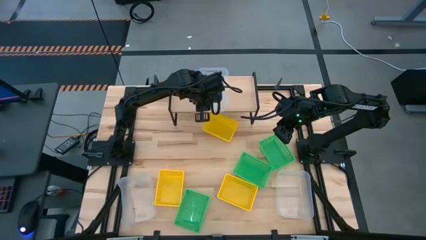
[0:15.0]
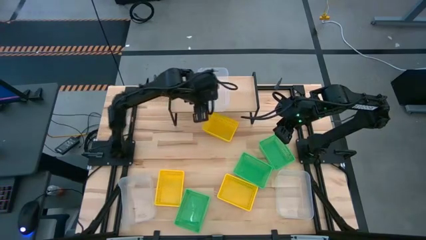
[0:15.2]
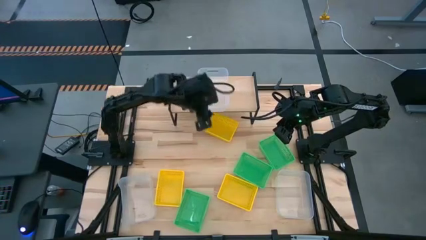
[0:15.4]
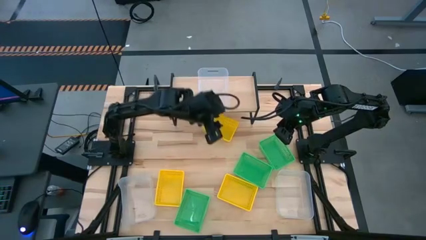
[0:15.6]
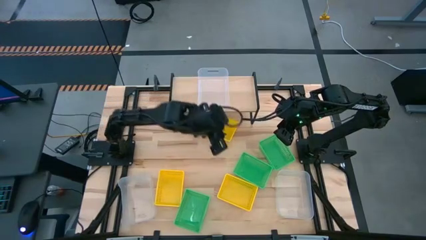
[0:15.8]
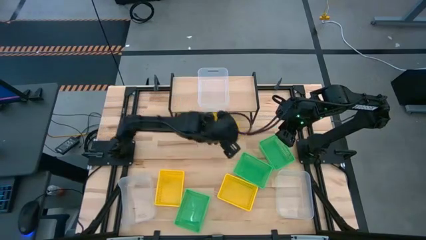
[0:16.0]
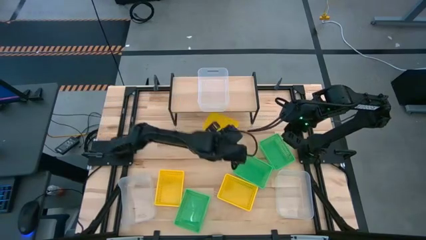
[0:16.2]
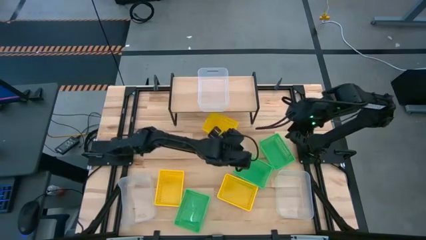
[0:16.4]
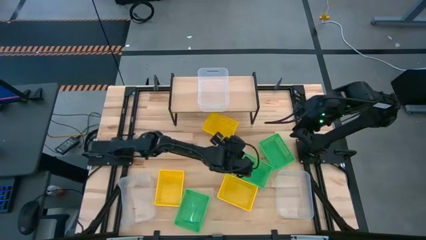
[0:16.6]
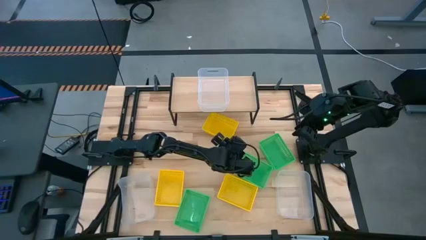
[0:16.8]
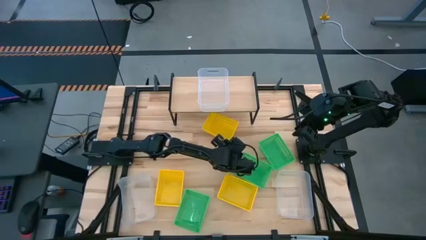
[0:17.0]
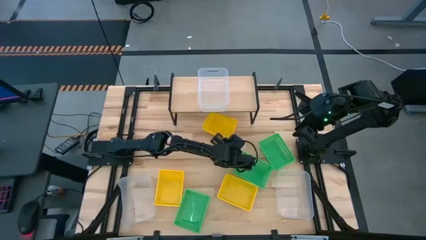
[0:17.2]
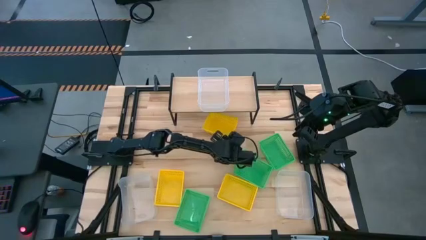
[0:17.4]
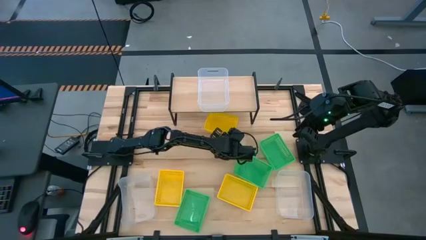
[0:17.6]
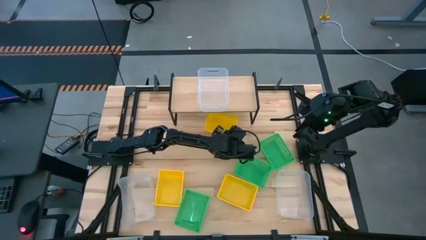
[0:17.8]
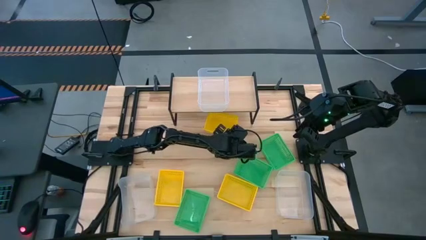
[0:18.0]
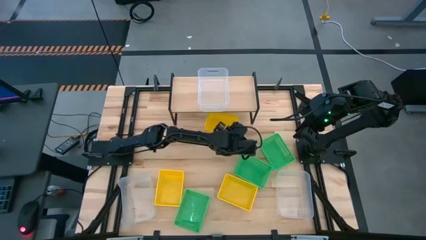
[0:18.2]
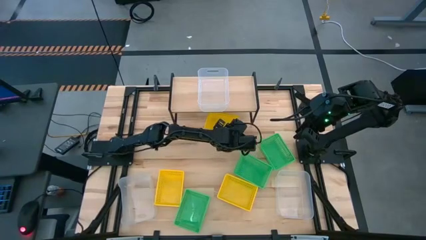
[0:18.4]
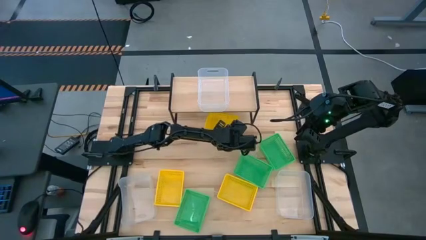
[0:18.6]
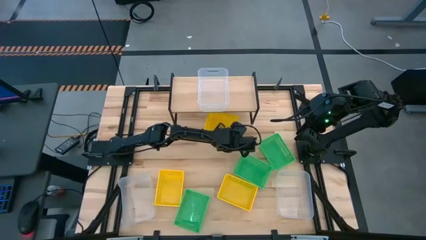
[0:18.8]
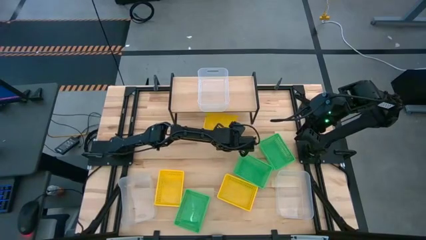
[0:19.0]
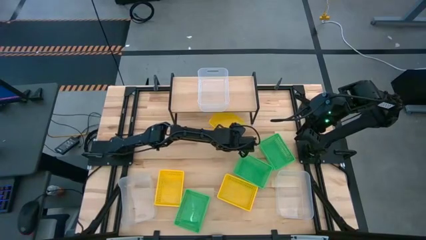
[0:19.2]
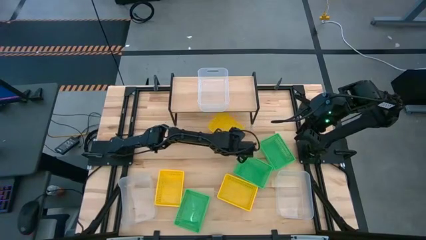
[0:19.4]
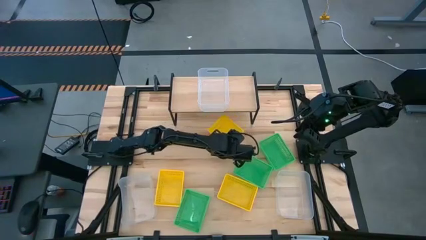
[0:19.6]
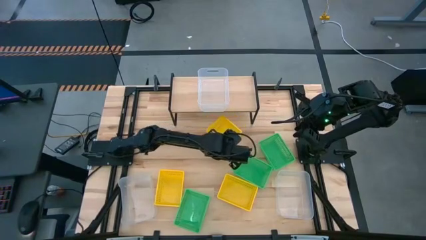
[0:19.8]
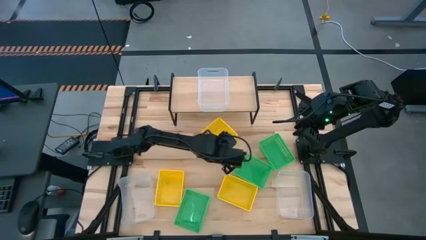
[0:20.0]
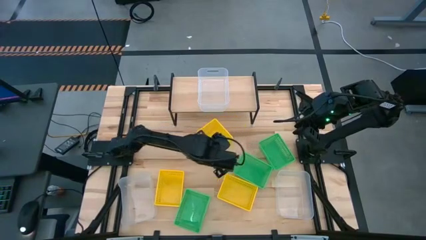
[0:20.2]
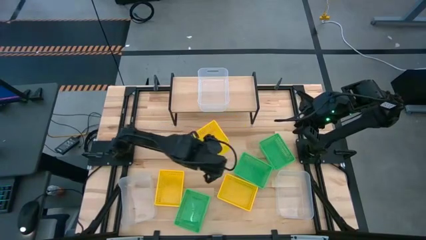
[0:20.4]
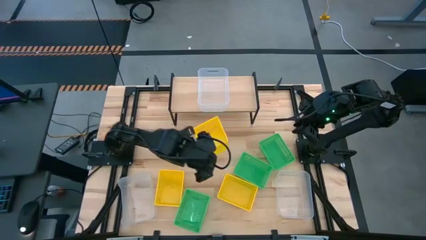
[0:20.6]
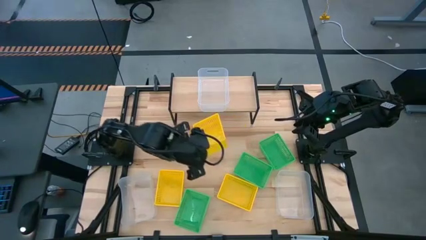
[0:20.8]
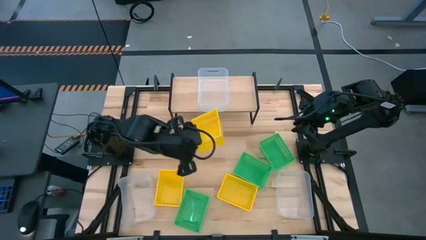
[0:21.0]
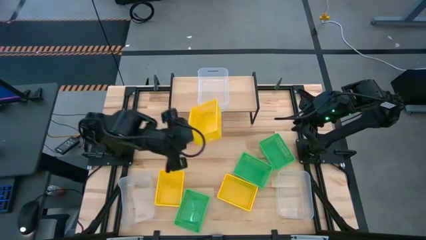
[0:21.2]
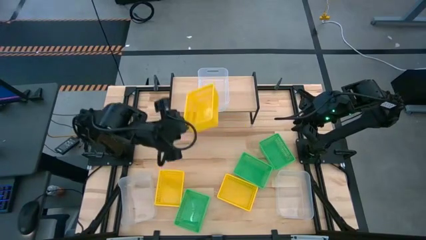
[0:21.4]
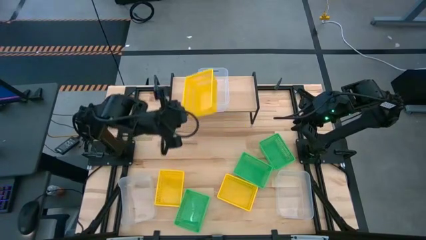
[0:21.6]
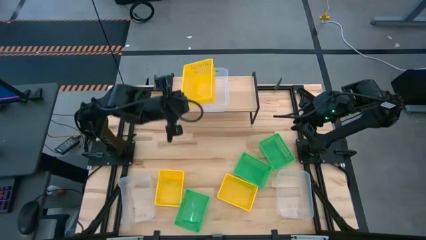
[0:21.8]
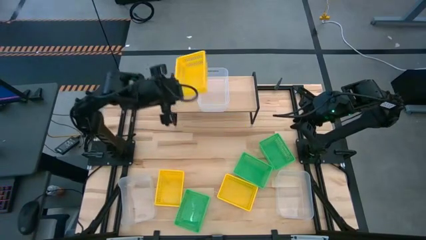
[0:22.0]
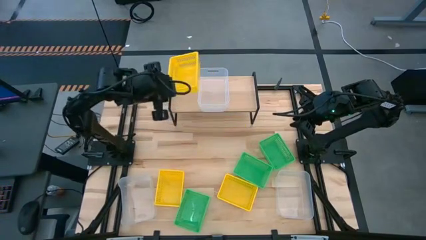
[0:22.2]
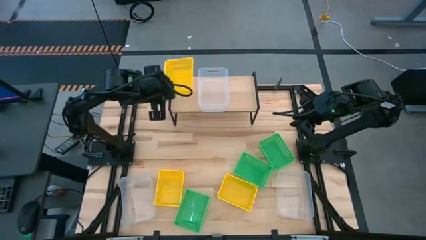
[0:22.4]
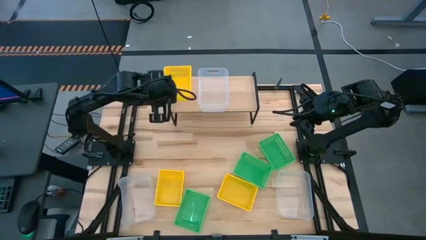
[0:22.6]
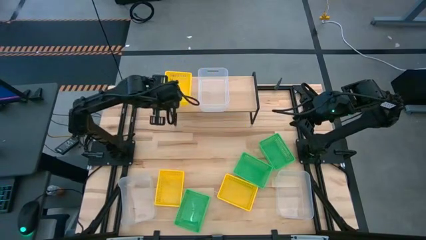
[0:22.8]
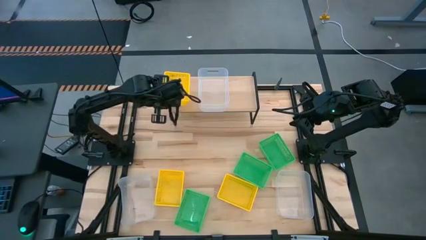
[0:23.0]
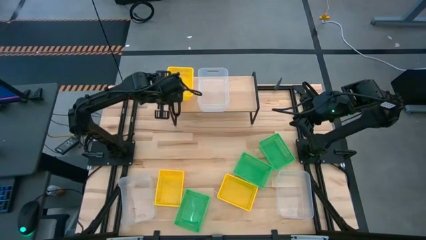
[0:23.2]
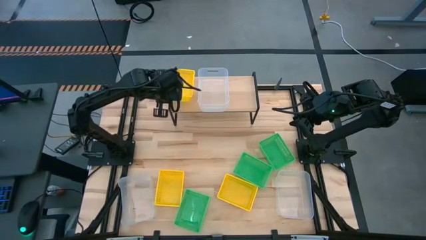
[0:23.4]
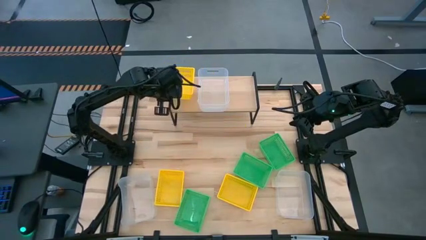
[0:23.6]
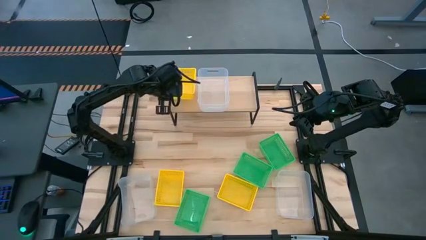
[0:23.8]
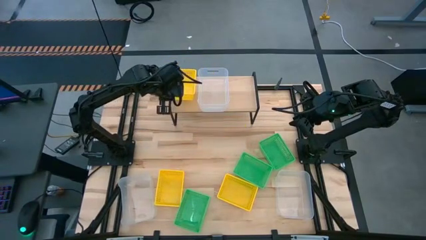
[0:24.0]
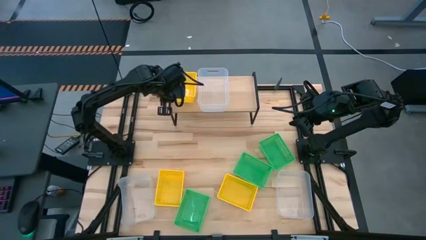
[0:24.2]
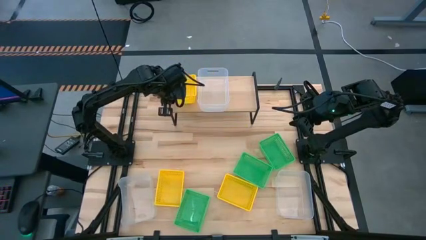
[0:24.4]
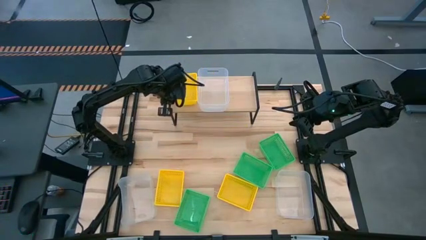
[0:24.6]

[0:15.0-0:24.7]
Task: Stack baskets on shelf by color
Put the top yellow bin on the shelf

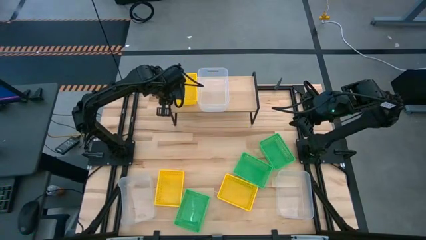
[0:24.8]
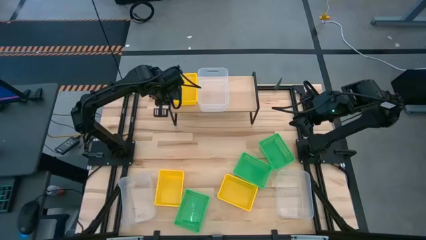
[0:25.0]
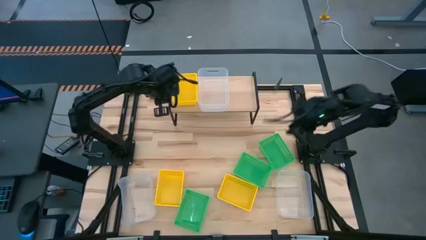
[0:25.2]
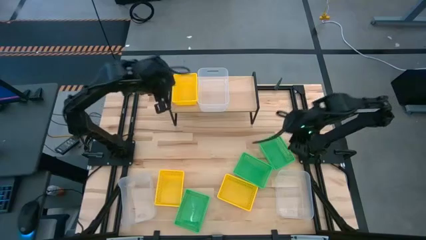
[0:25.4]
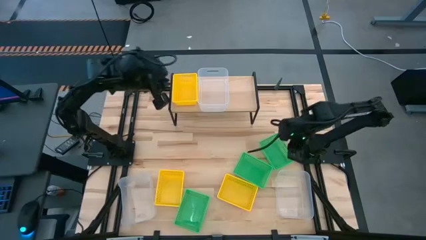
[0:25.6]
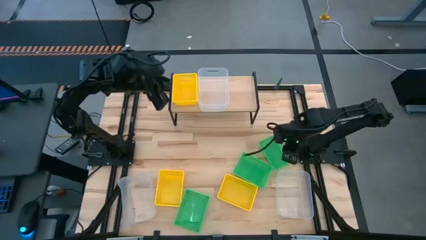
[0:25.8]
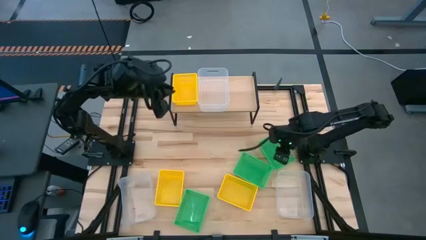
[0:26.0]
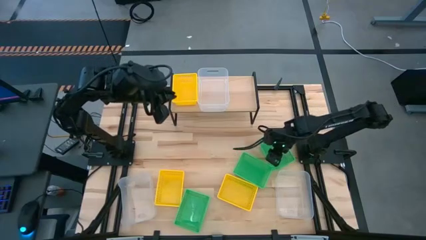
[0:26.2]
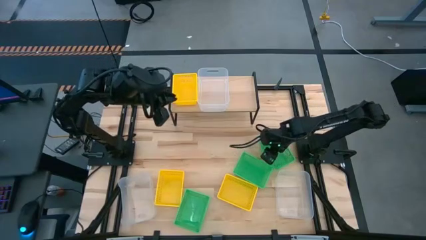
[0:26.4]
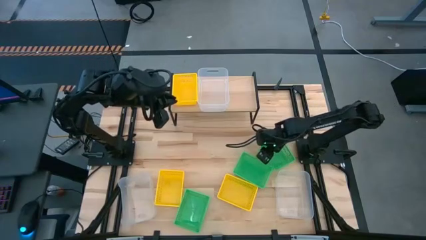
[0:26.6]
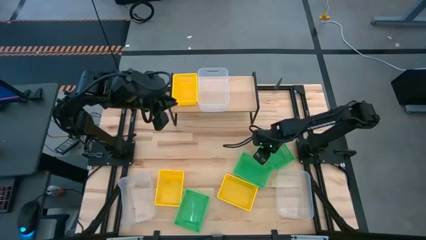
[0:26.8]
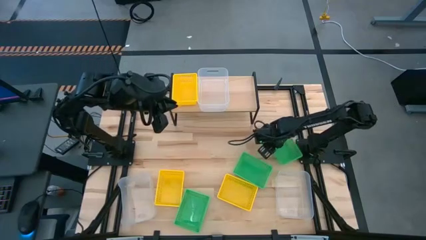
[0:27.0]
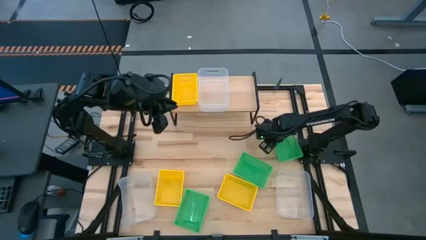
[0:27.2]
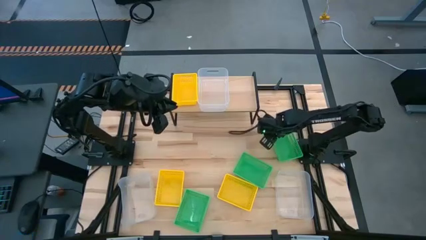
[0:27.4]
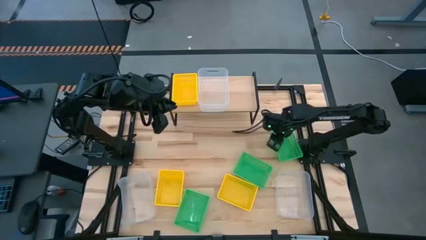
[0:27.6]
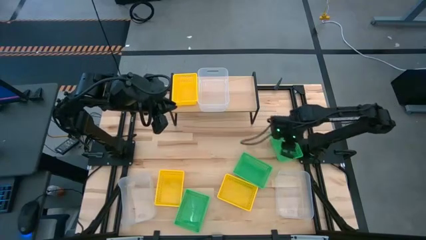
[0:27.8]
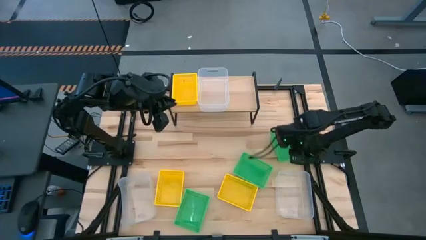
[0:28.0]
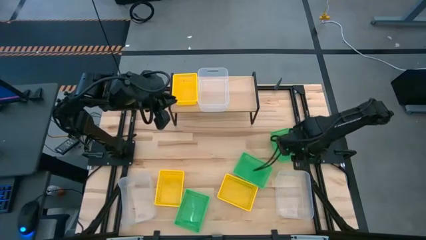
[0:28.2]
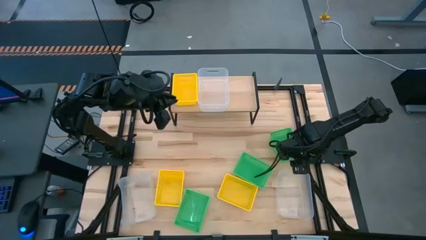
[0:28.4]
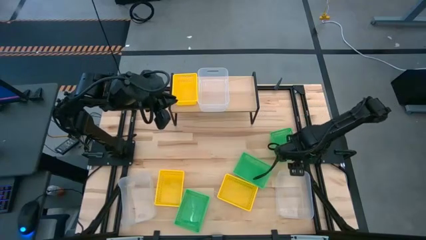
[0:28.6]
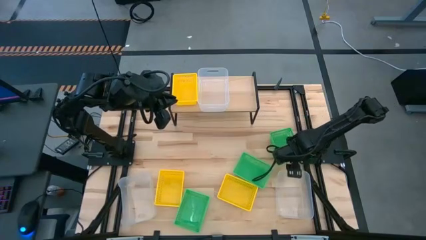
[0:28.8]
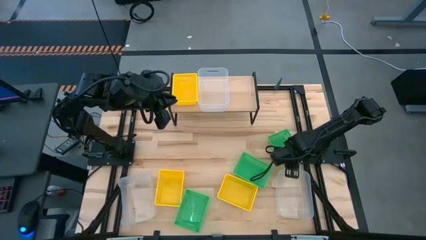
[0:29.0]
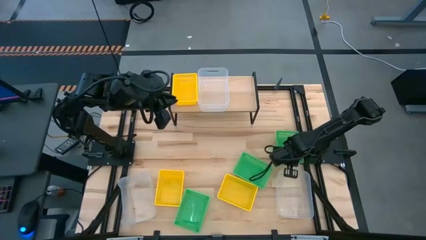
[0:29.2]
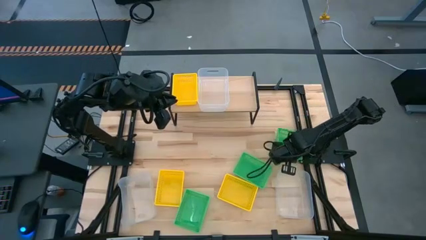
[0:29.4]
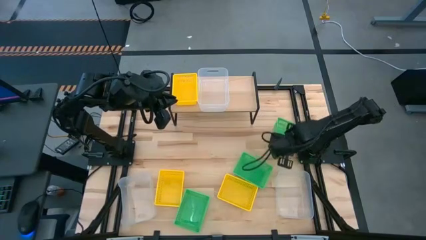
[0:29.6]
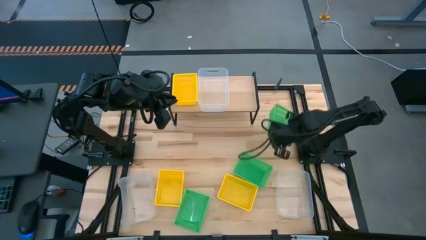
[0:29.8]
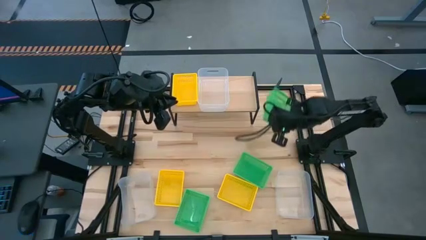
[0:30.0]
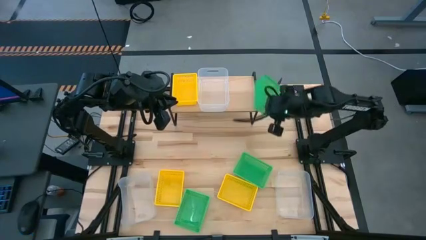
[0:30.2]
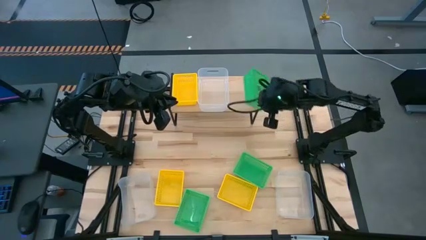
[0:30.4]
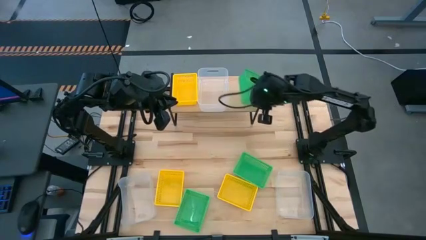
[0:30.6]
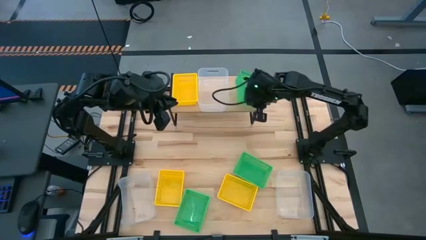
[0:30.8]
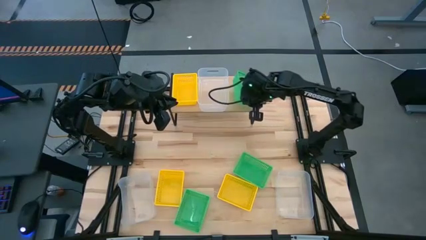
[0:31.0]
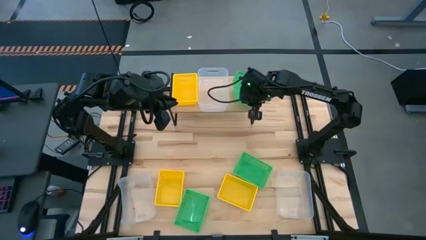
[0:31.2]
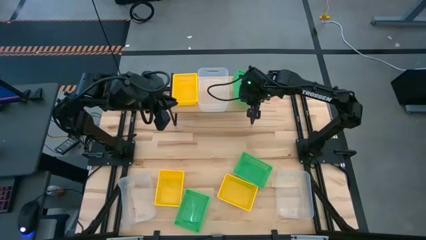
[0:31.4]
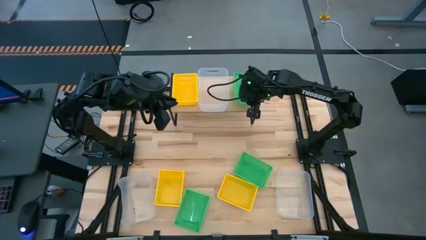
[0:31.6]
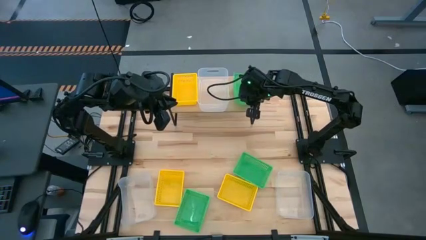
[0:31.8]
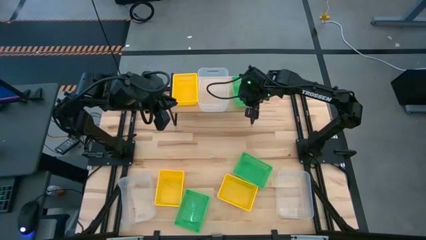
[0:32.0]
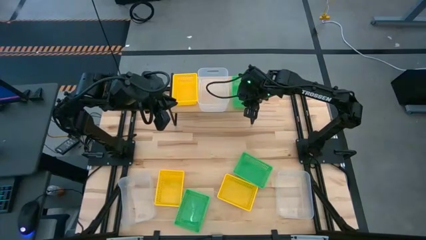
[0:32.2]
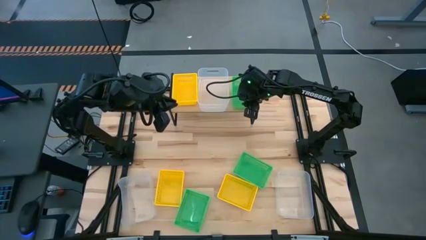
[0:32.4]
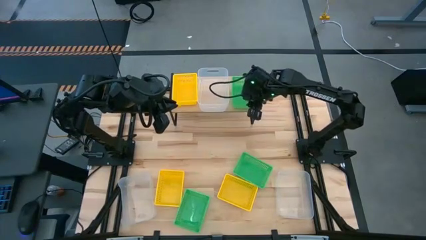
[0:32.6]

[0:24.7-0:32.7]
Put the top green bin on the shelf
